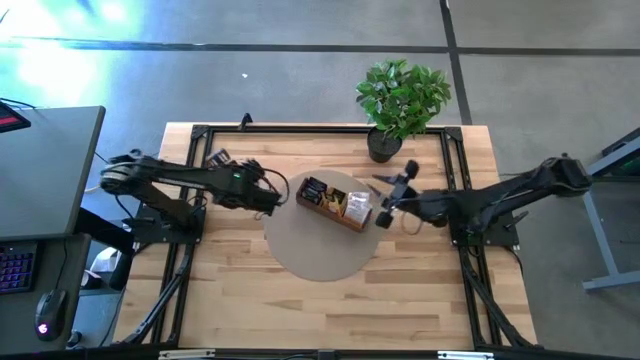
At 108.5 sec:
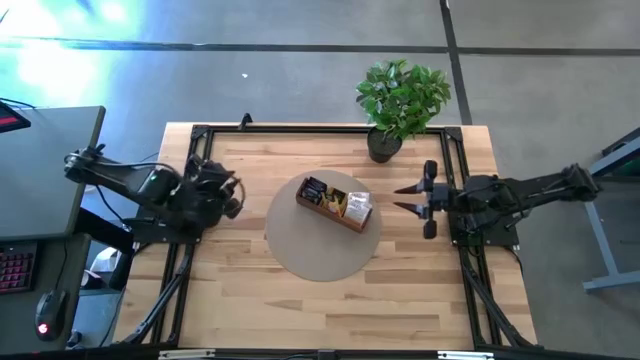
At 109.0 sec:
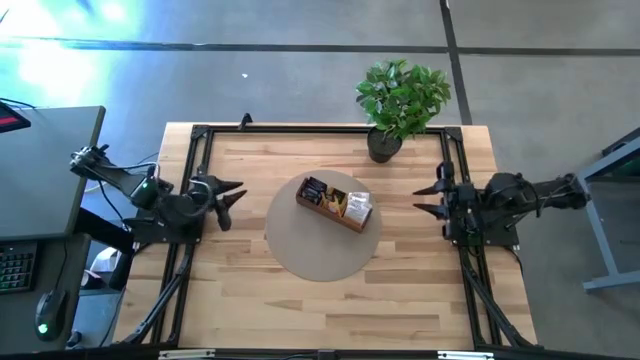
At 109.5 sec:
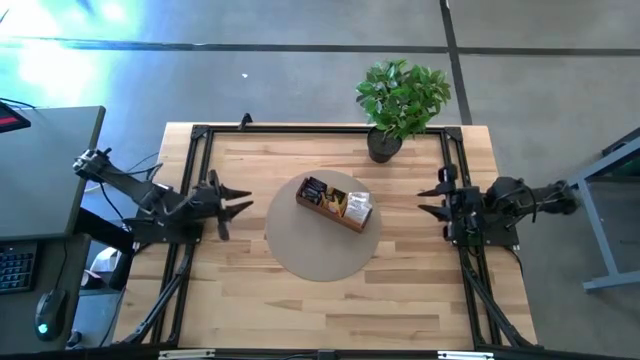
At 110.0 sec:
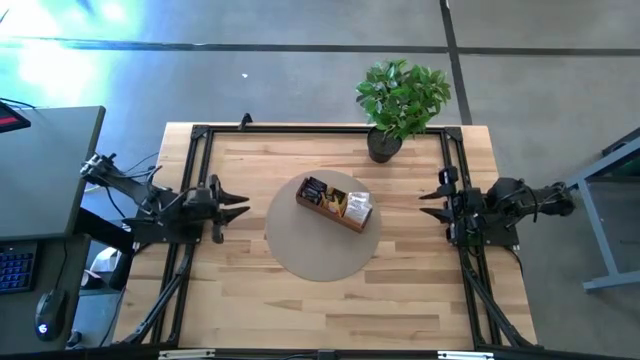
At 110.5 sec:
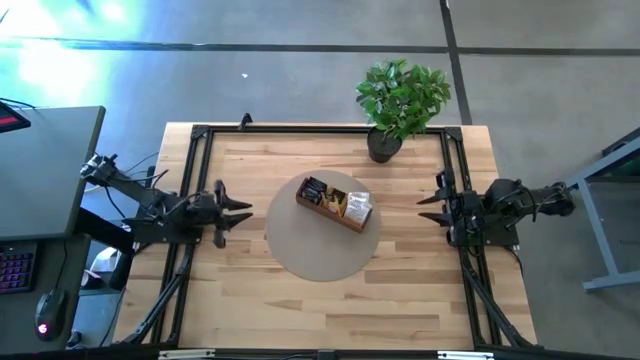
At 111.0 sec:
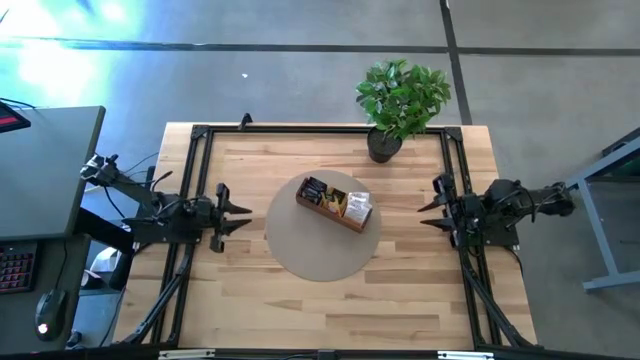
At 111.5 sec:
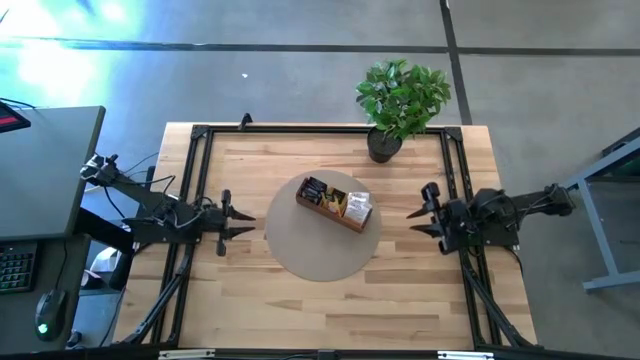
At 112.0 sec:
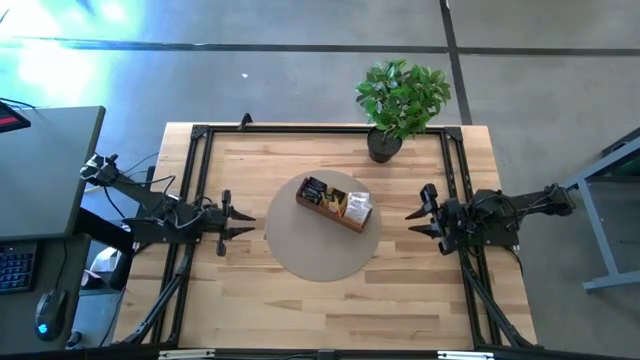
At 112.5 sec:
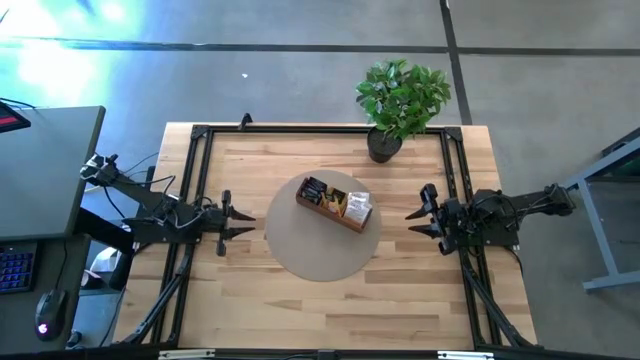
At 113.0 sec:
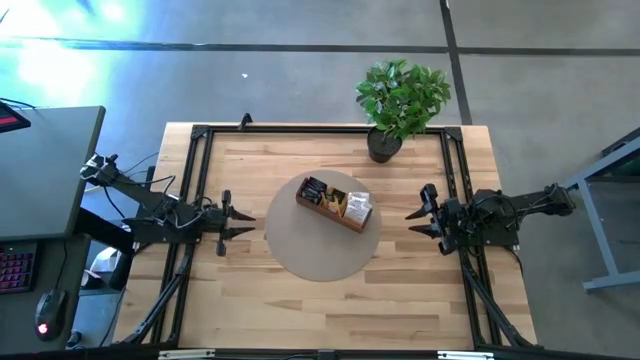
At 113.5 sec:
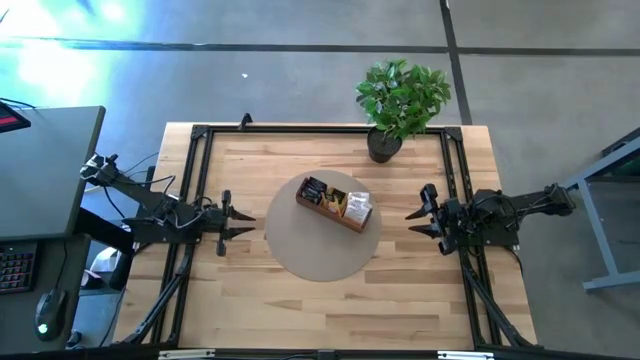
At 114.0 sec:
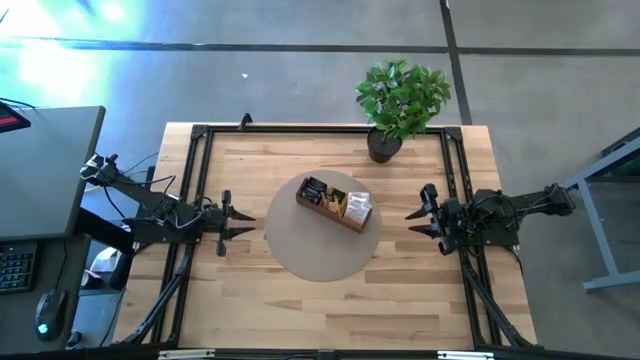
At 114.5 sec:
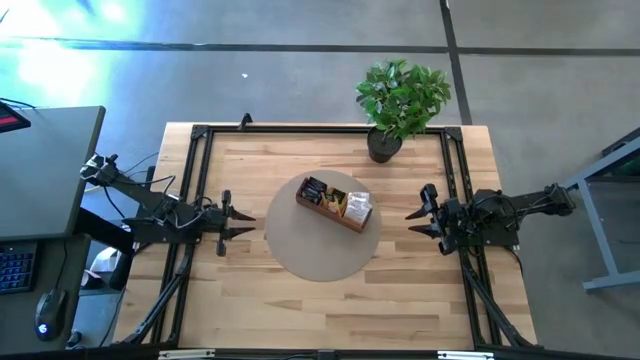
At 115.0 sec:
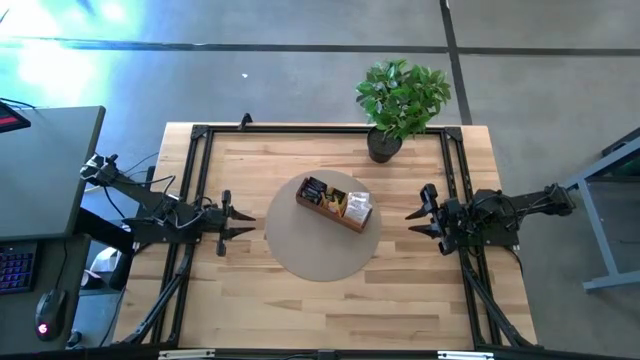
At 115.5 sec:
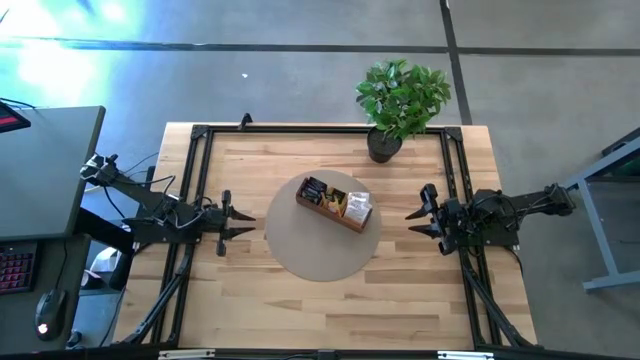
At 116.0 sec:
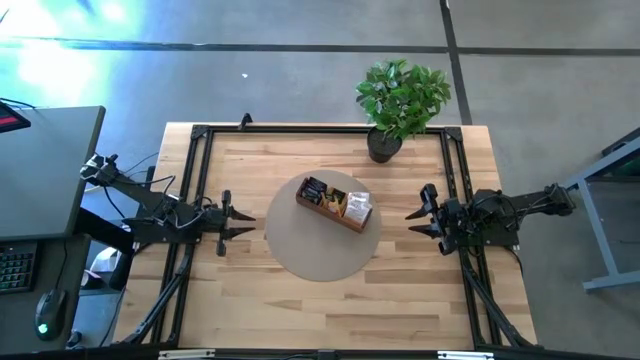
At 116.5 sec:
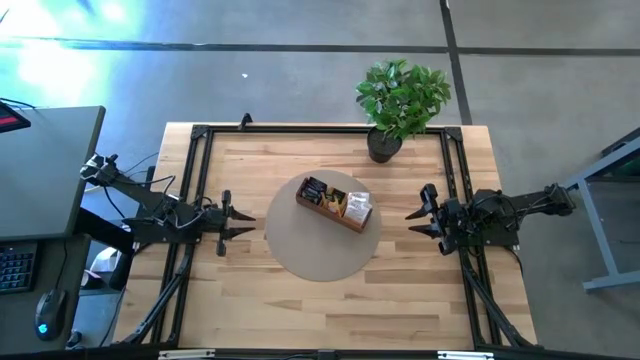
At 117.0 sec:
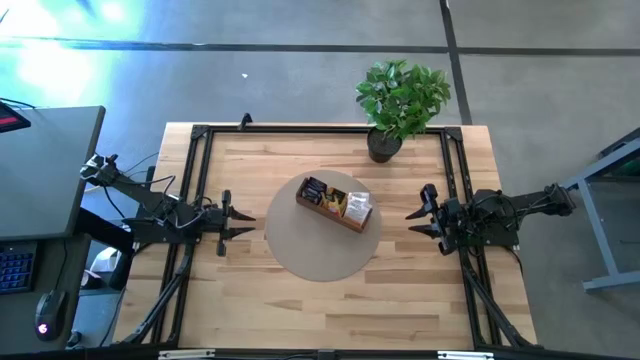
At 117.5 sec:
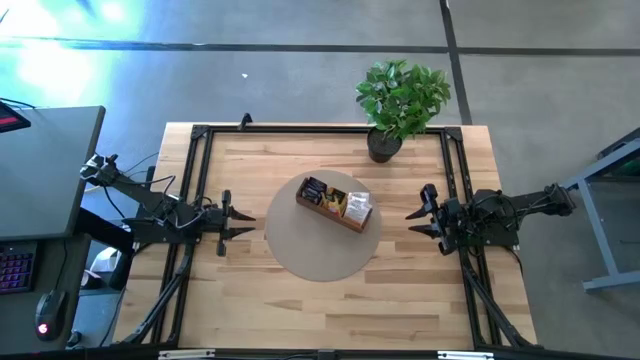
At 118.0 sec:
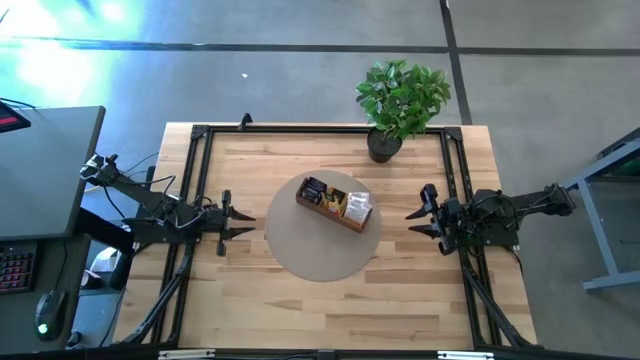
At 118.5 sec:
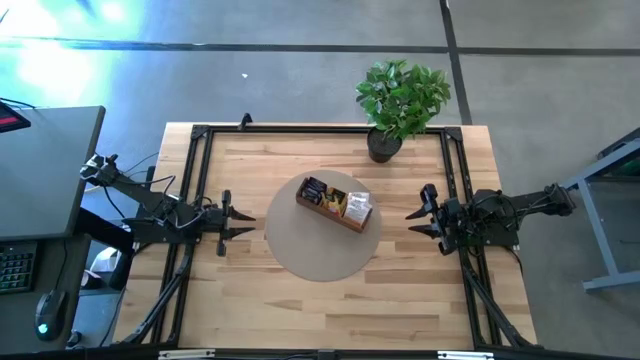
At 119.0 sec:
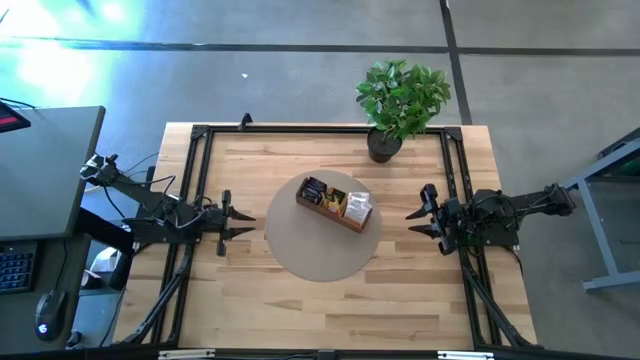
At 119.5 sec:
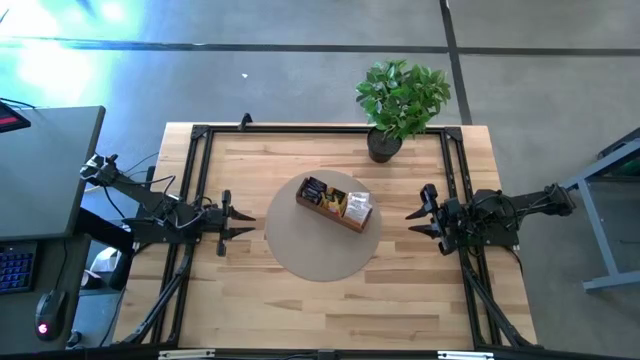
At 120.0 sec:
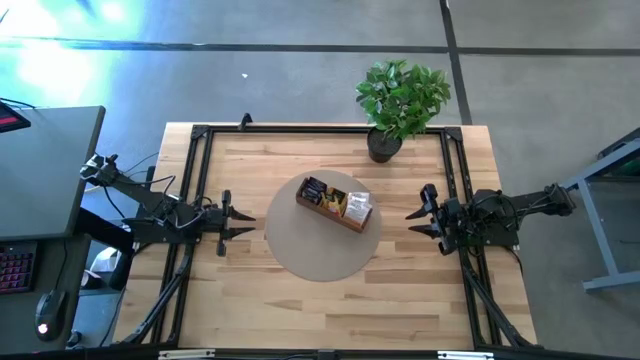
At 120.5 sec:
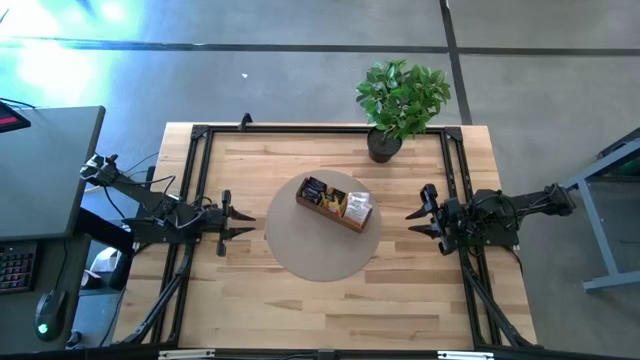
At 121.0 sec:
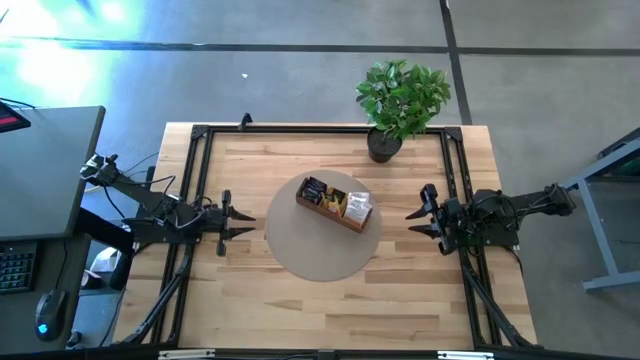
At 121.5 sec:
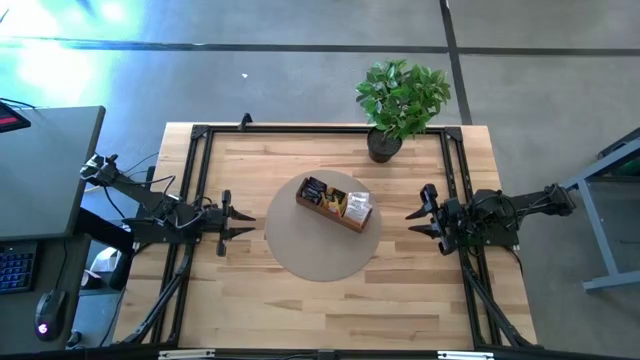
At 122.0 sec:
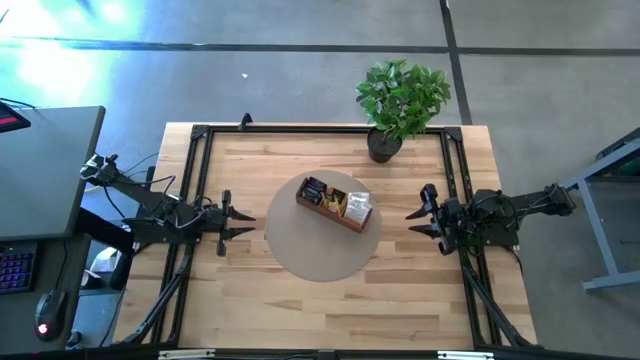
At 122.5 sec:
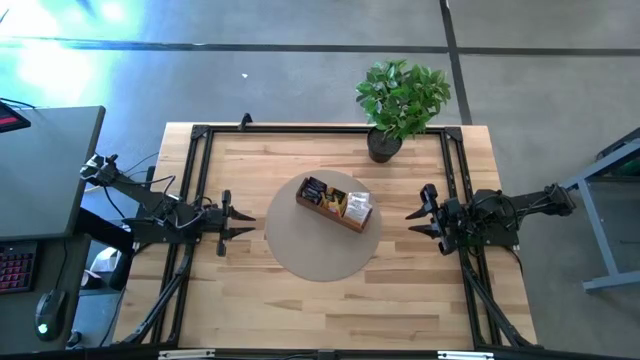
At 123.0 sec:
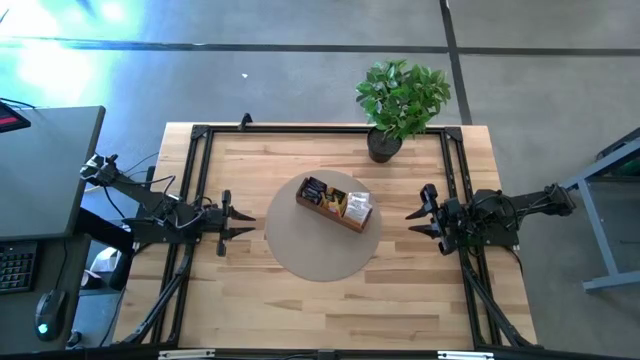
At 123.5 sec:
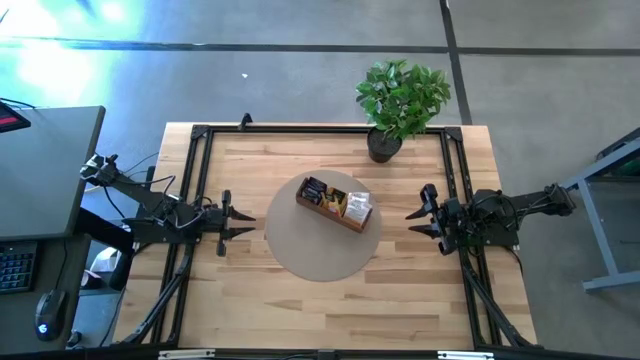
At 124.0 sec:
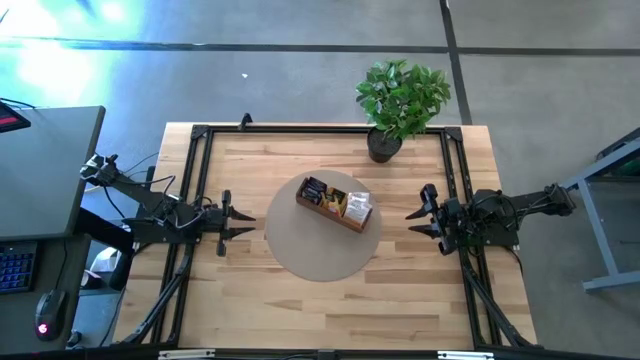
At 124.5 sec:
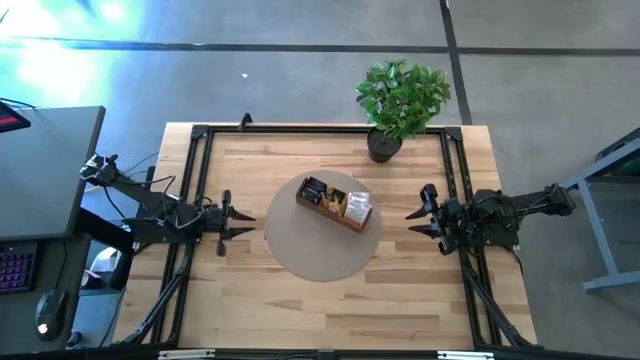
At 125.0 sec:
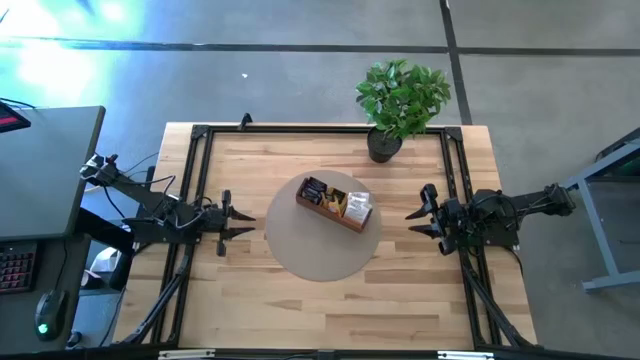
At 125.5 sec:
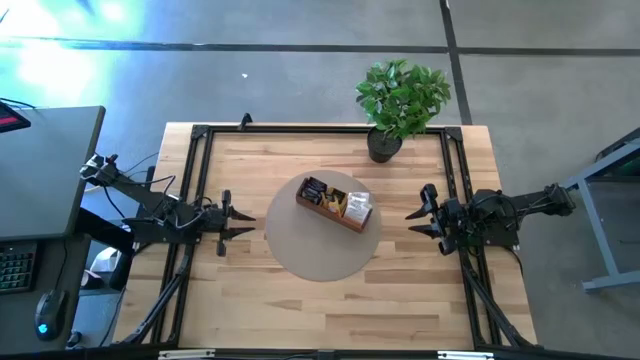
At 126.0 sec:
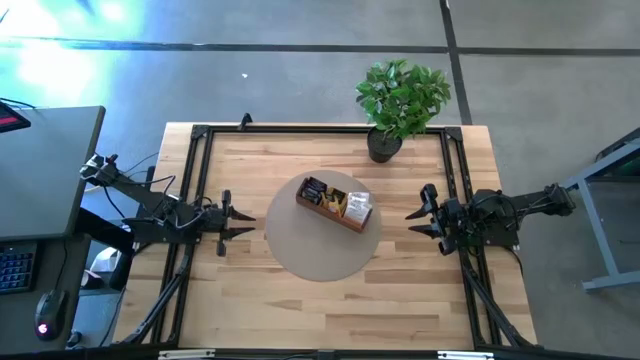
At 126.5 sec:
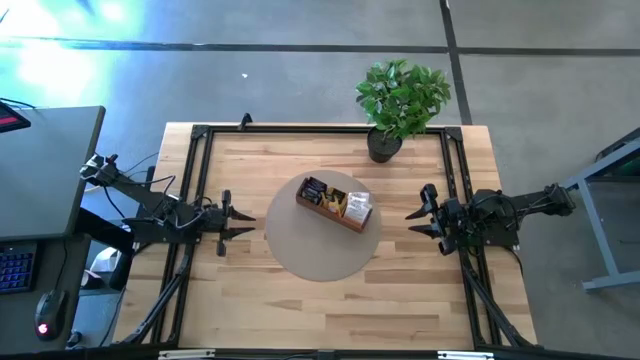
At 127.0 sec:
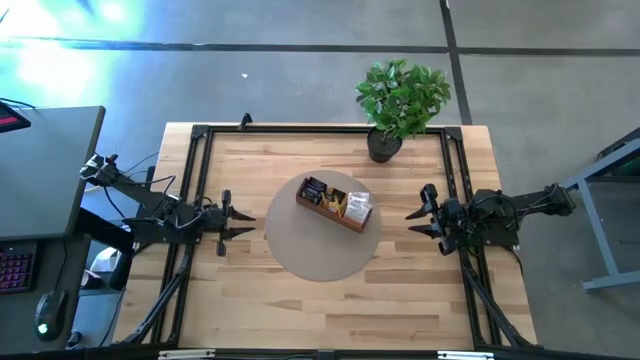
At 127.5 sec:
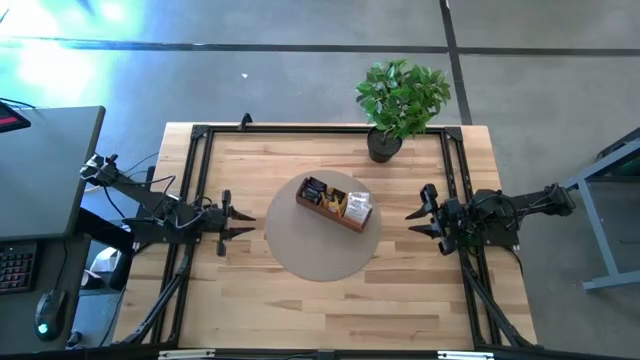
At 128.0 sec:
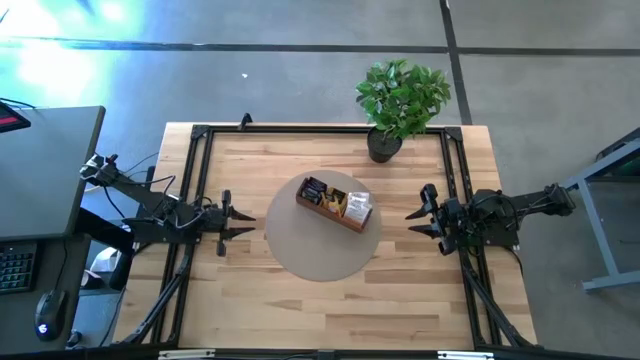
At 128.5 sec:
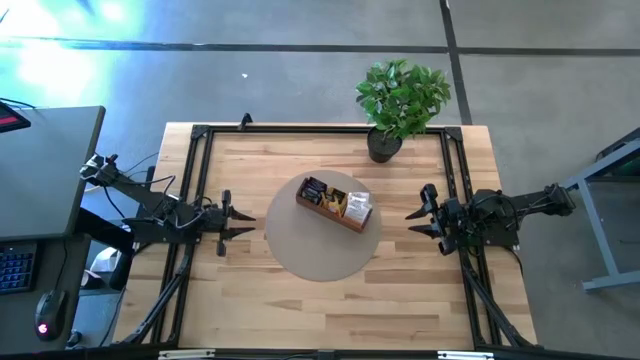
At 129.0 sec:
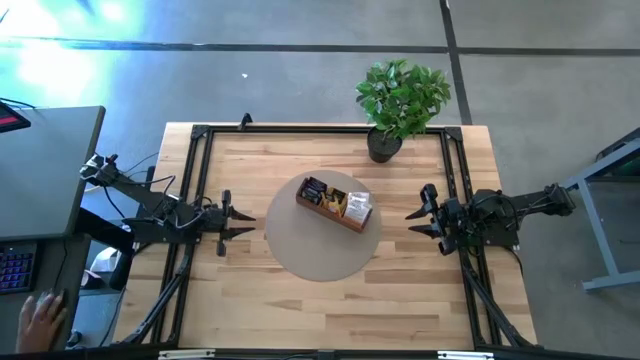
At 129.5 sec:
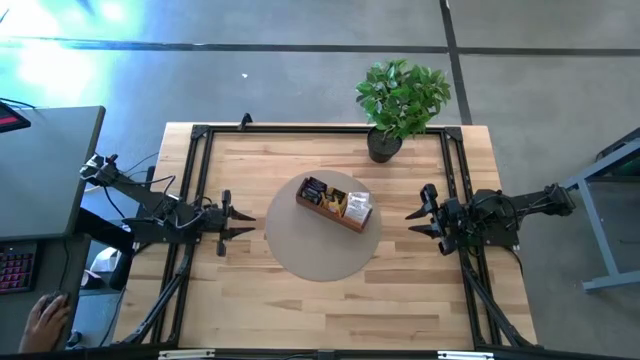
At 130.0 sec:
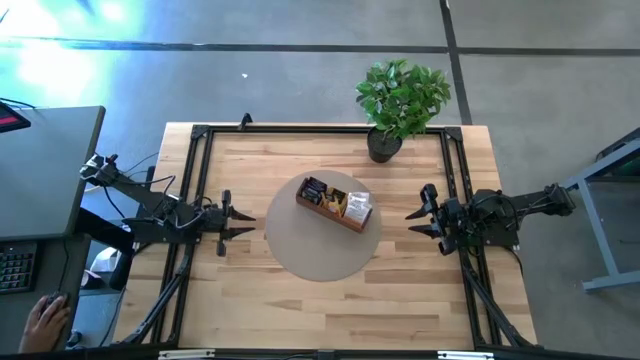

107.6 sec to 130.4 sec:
Task: Pick & Place Tea
Return To Home Position
